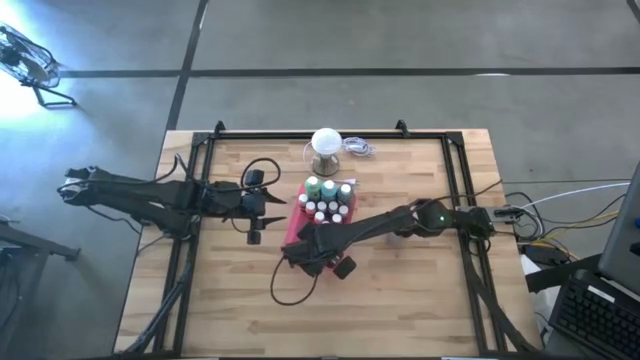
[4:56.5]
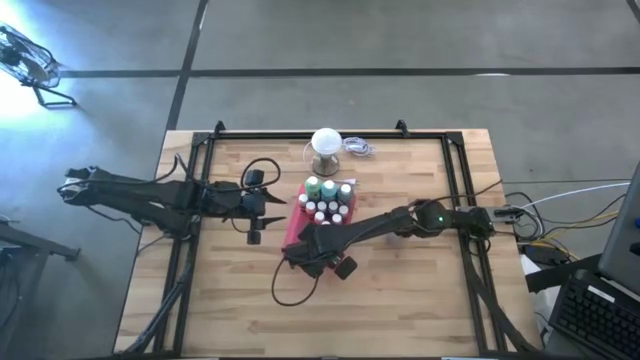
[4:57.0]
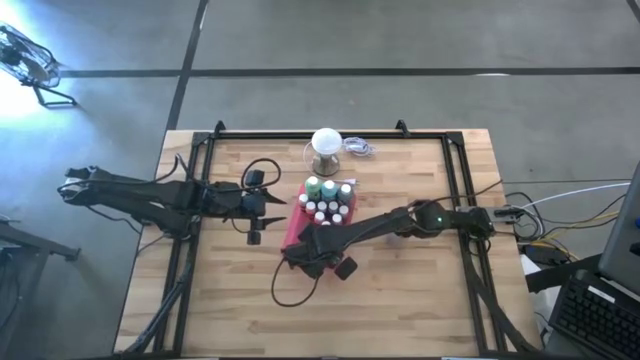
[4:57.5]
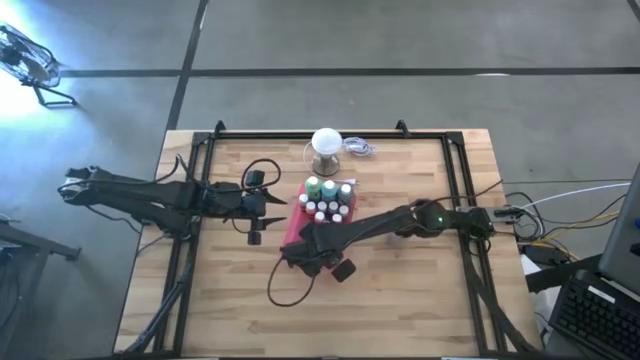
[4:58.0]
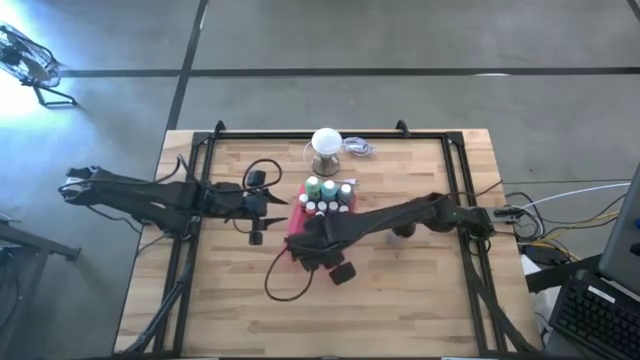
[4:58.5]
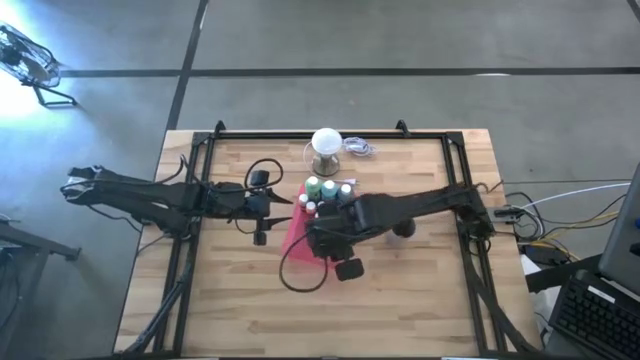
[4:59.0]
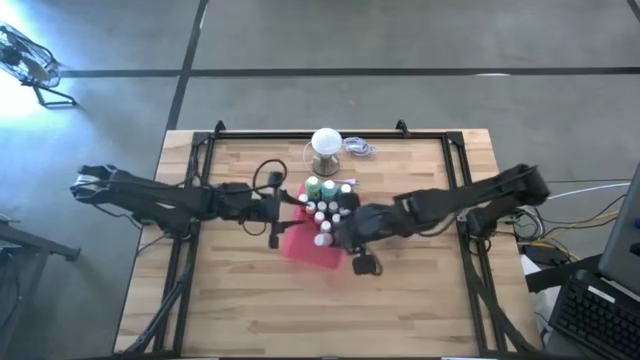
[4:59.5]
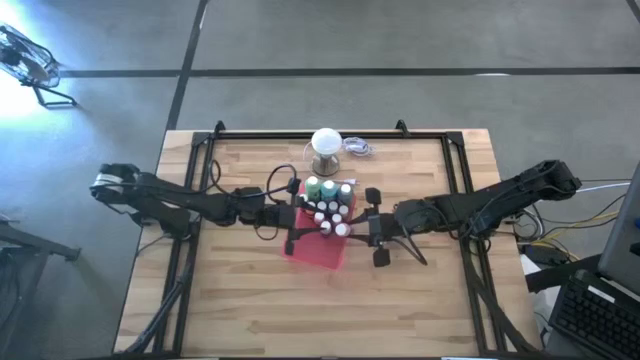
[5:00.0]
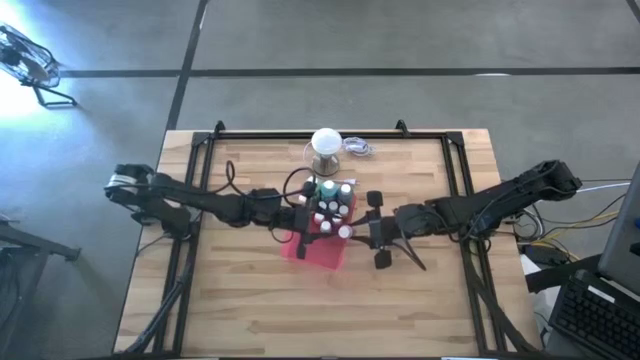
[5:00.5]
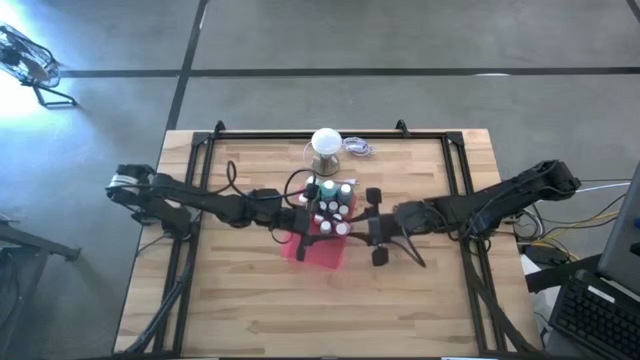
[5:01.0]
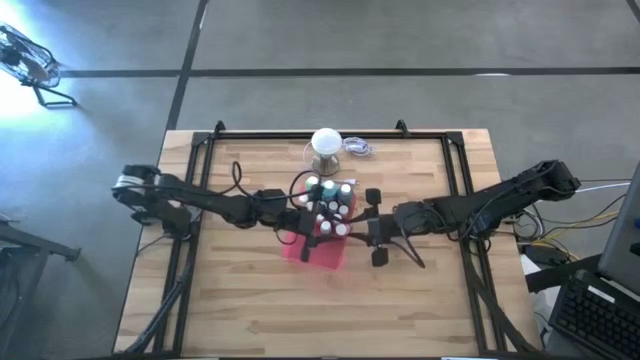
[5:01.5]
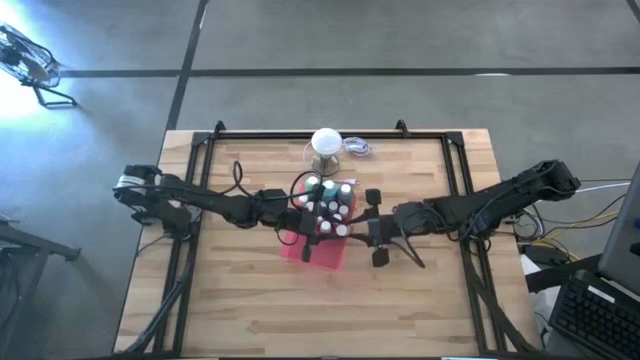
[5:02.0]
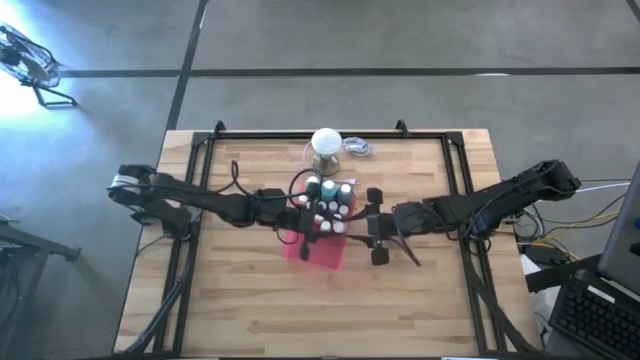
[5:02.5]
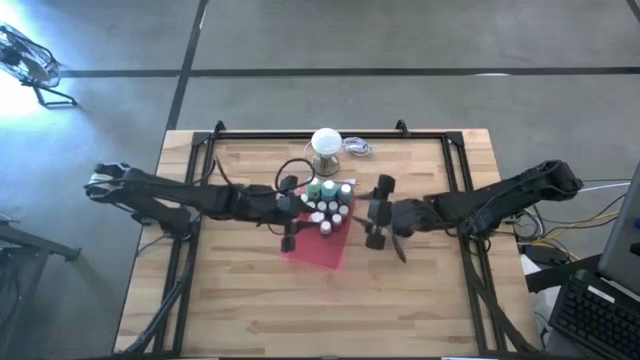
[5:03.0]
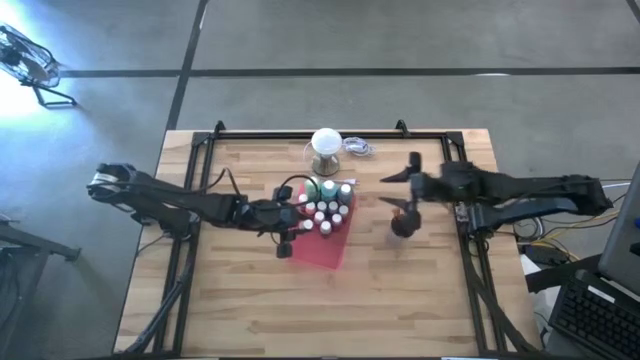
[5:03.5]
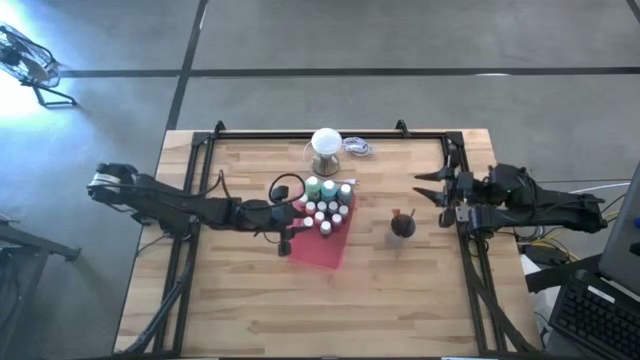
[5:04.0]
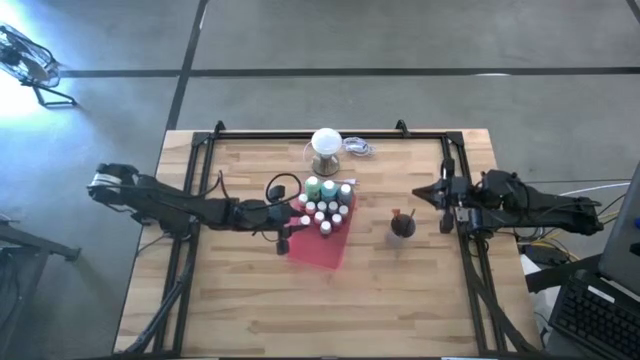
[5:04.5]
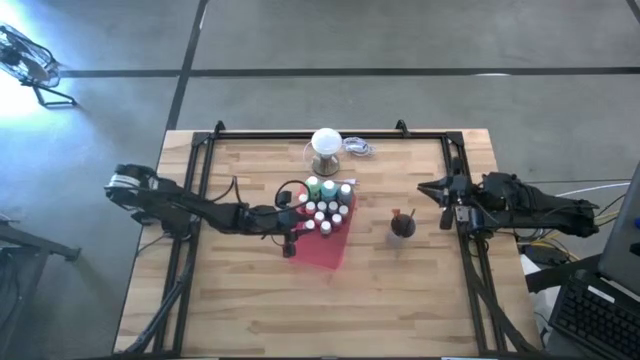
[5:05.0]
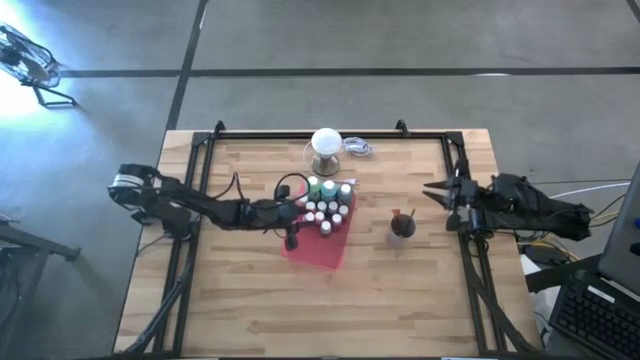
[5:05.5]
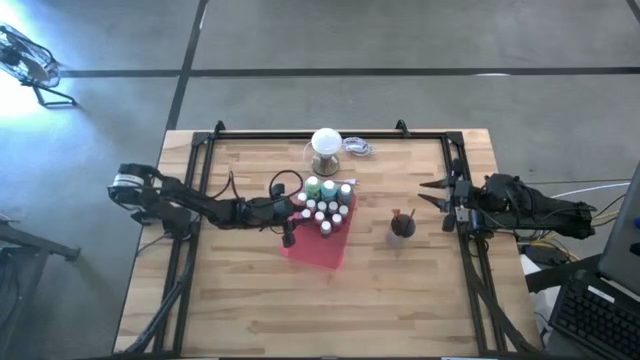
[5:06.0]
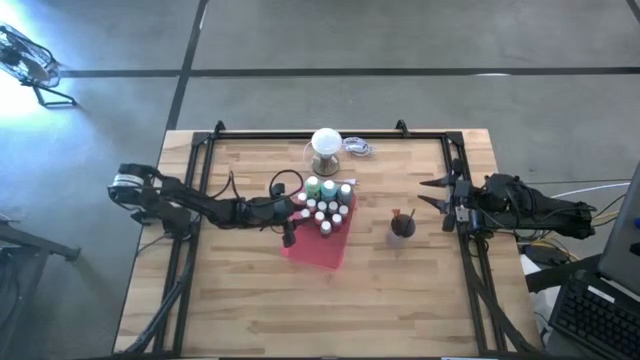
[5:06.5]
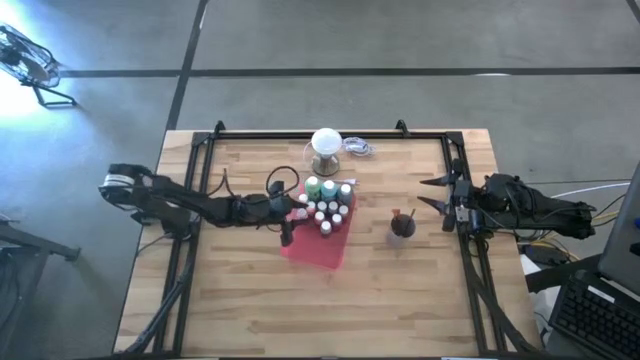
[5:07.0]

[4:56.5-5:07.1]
Task: Pick & Place Paint Supplies
Put the small pink paint bottle into the red bin

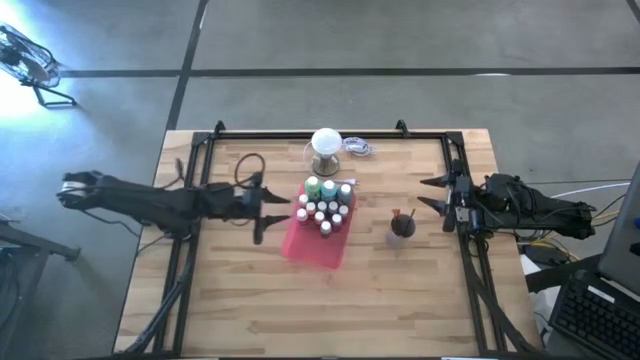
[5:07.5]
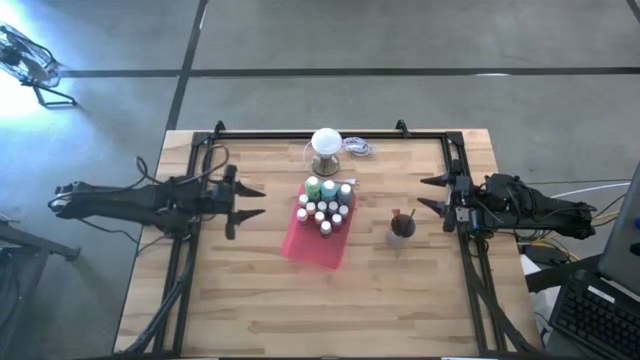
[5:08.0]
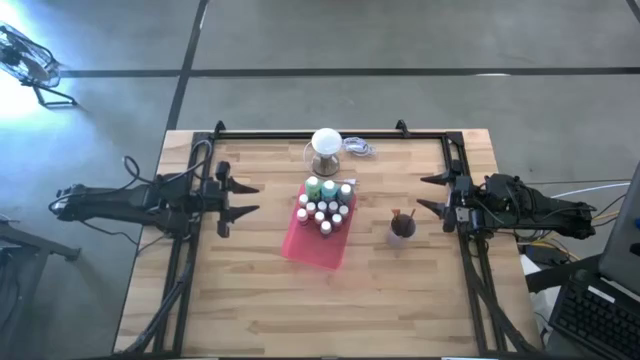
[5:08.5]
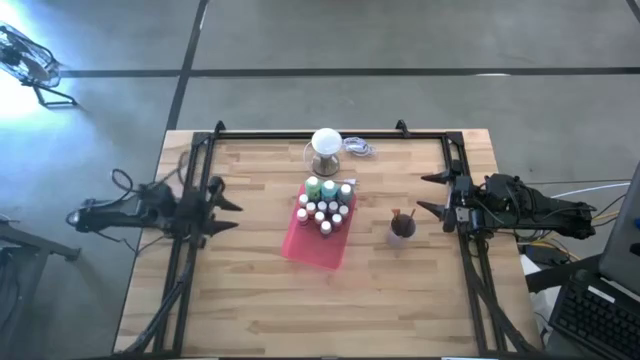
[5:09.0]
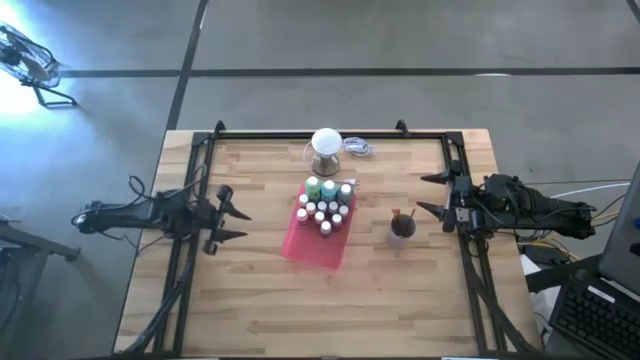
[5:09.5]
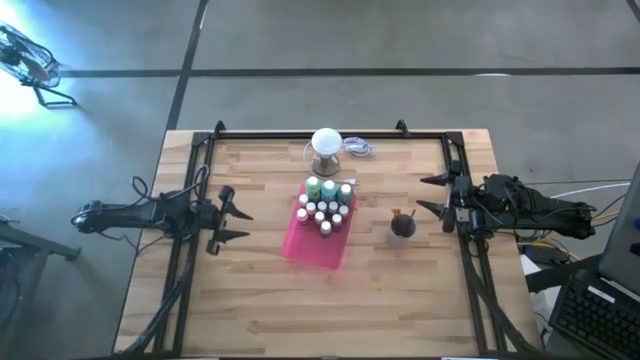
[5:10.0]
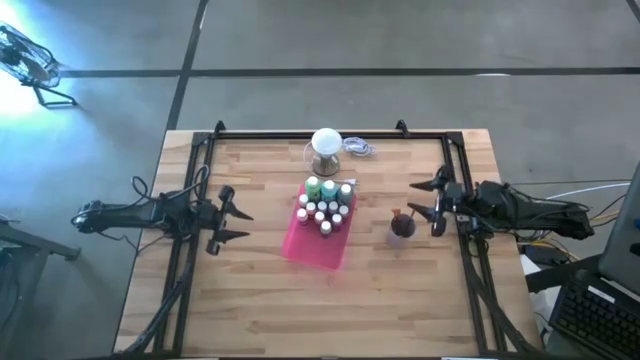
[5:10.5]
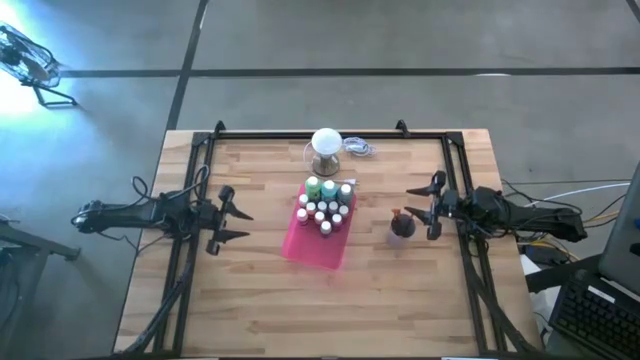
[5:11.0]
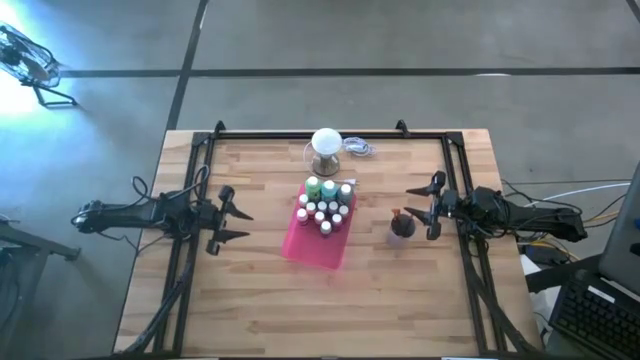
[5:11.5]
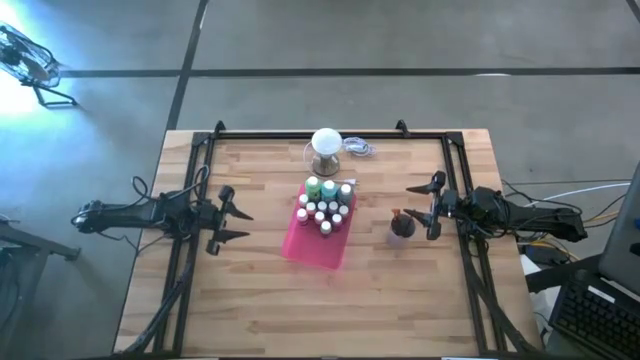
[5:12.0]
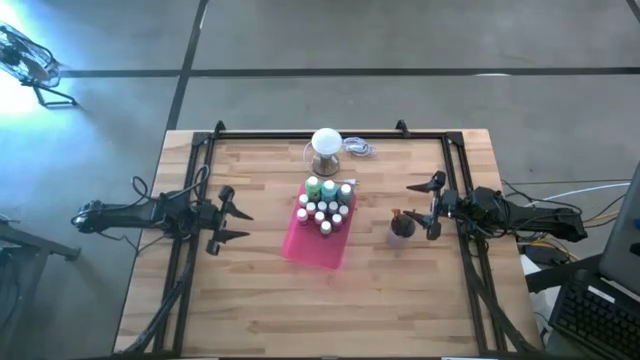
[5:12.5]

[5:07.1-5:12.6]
Return to Home Position

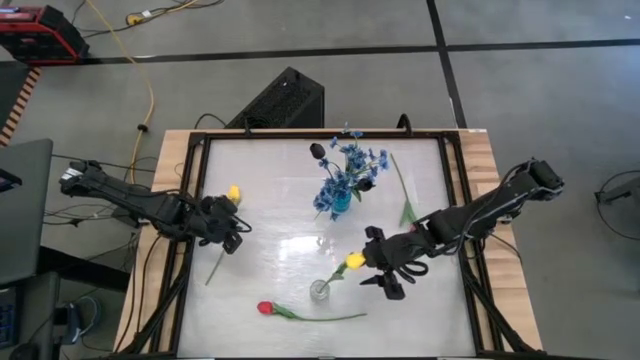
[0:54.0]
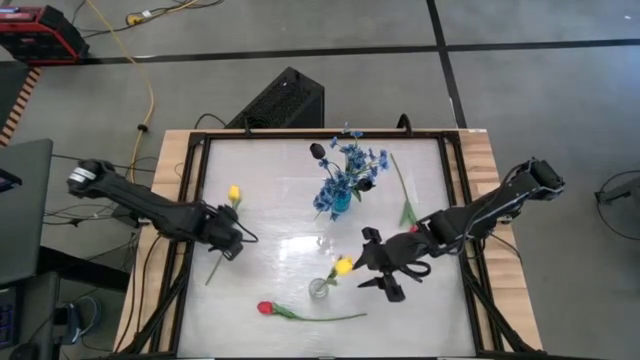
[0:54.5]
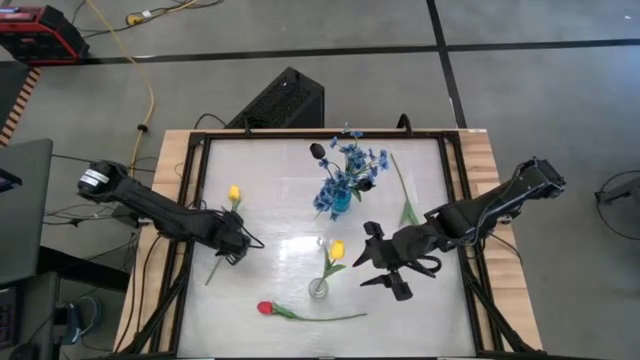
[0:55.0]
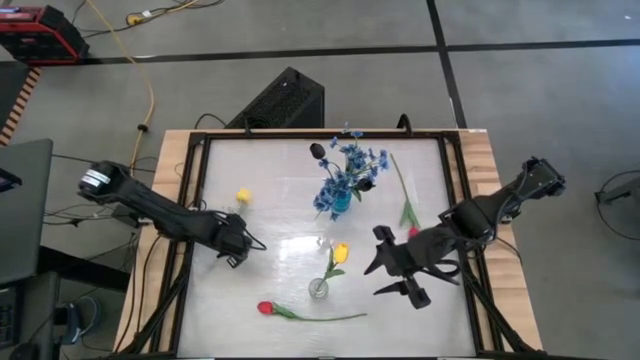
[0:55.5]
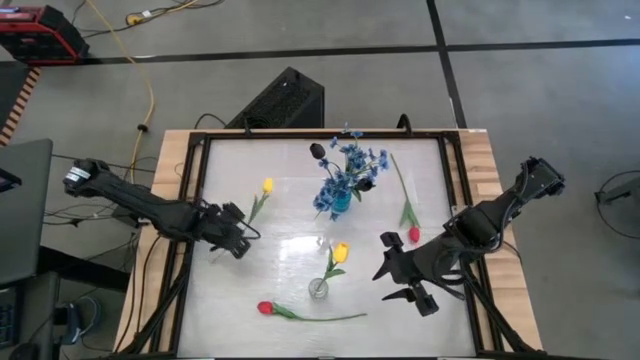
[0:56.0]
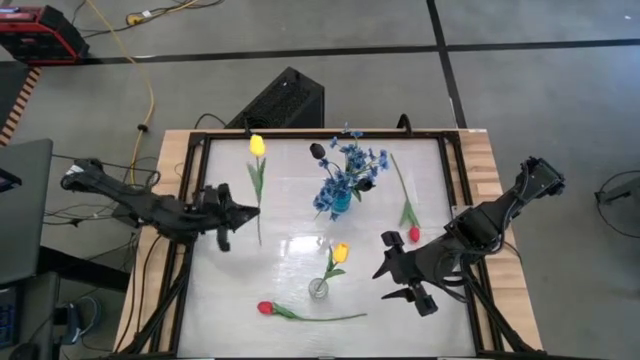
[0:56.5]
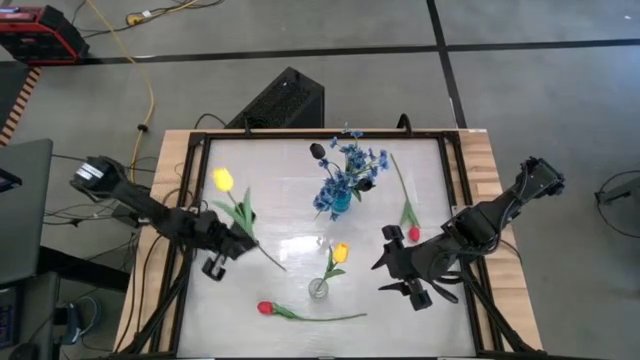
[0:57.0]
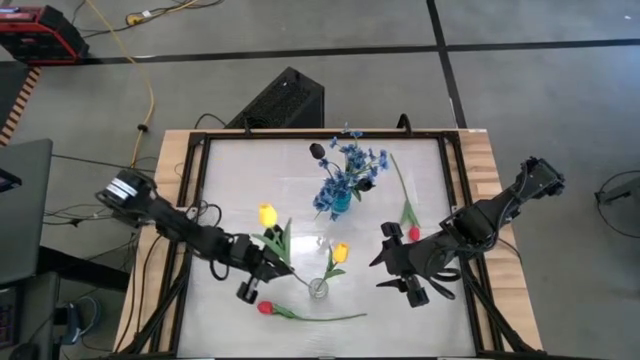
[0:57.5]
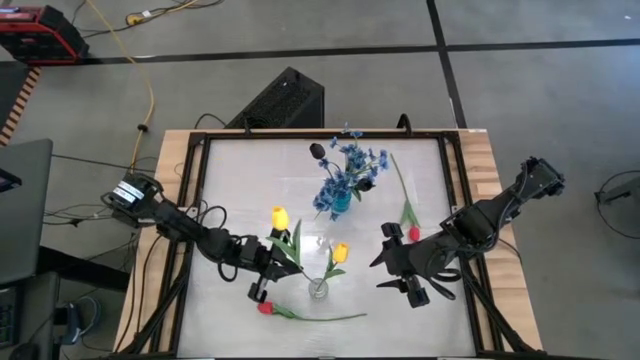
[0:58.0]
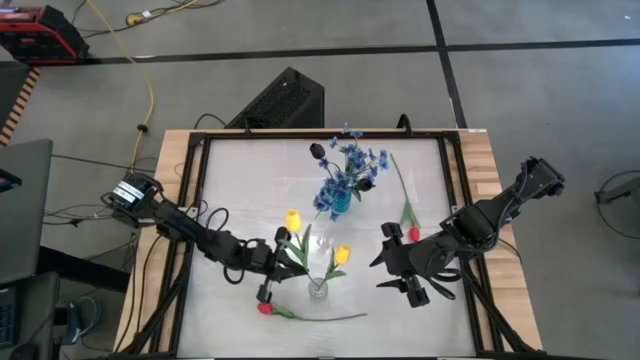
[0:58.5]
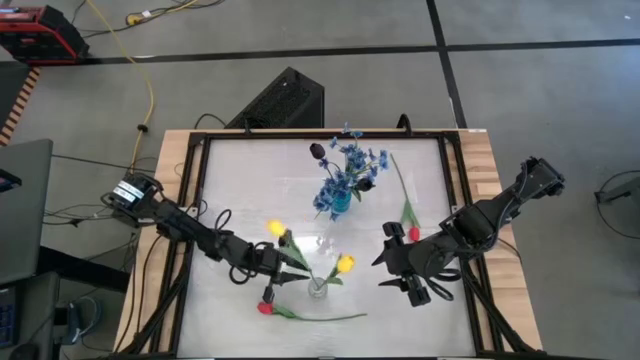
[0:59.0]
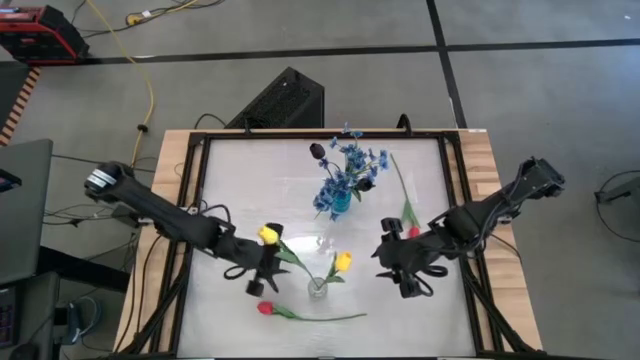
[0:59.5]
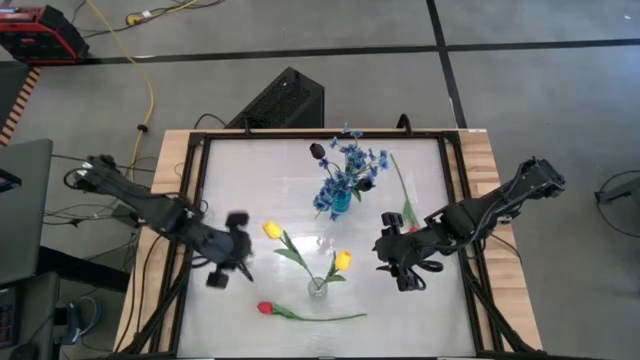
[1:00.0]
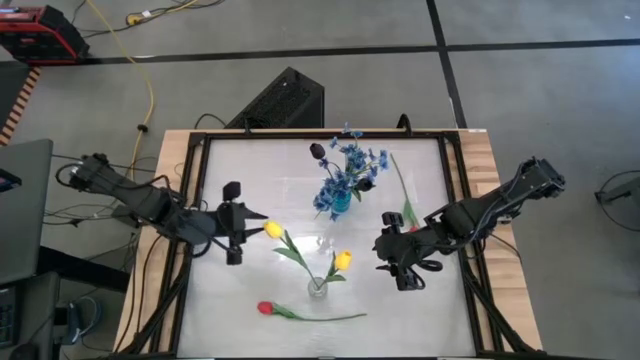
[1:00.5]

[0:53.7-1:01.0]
Task: Sort flowers into vase by color
Put the yellow flower into the transparent vase
